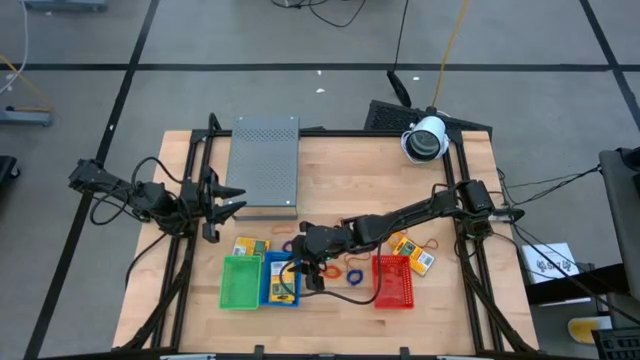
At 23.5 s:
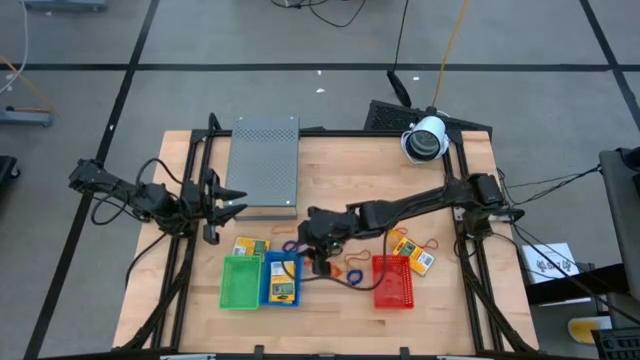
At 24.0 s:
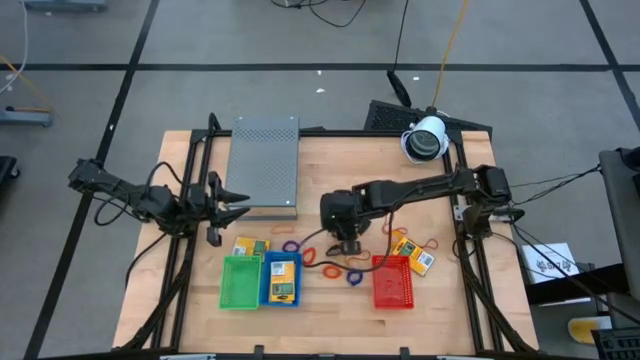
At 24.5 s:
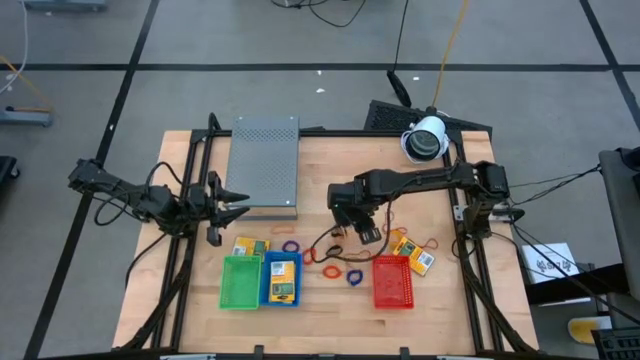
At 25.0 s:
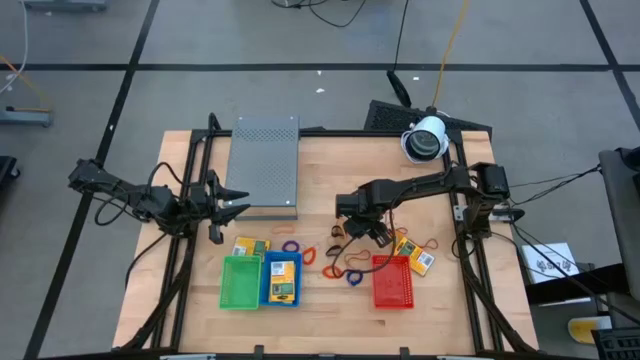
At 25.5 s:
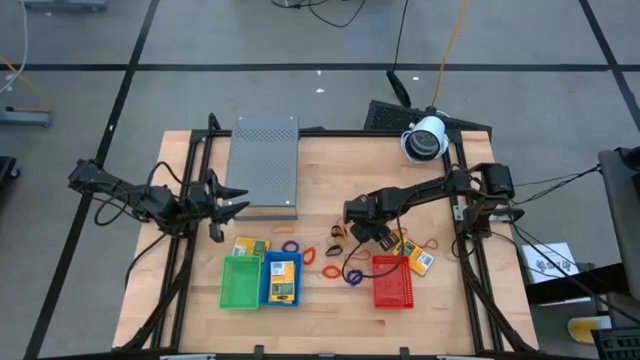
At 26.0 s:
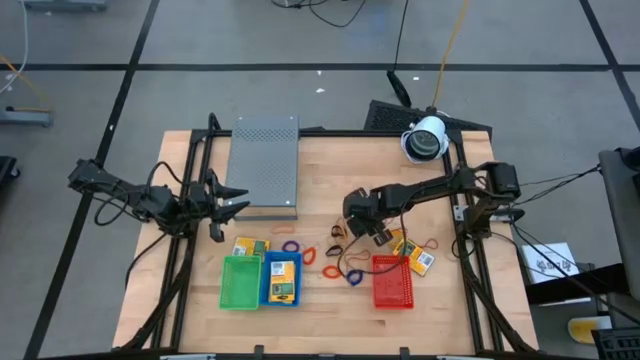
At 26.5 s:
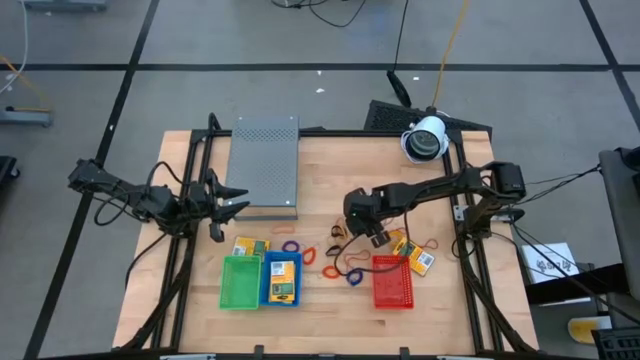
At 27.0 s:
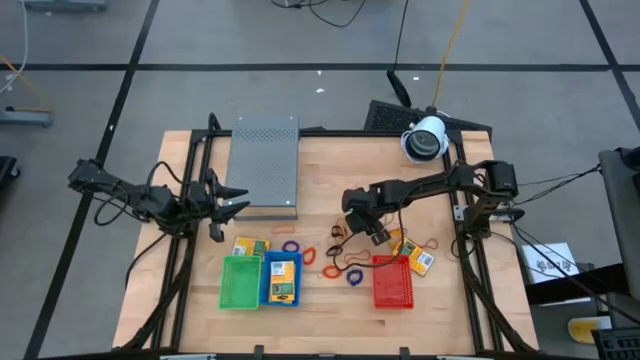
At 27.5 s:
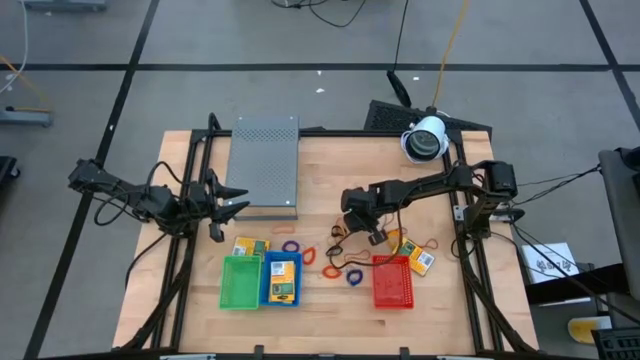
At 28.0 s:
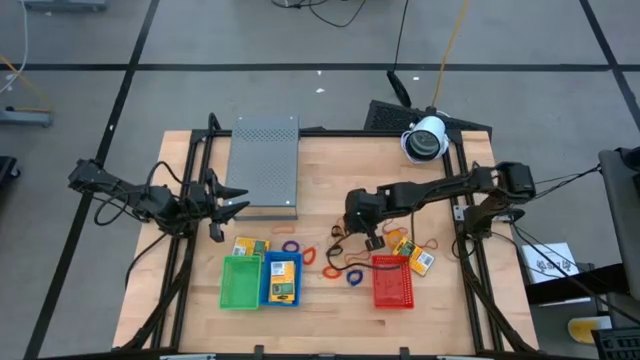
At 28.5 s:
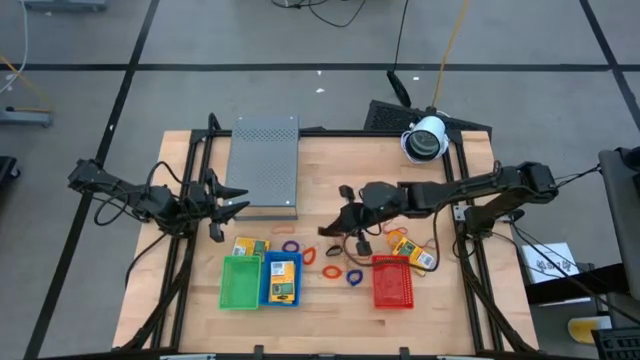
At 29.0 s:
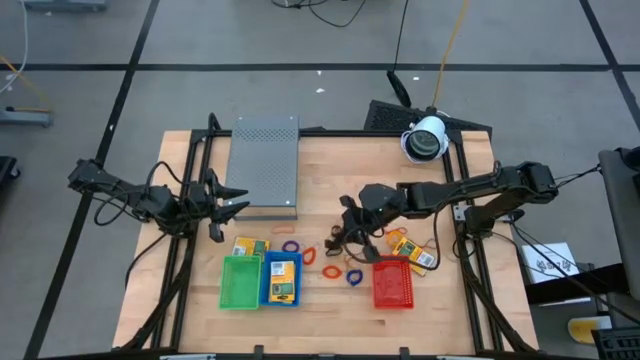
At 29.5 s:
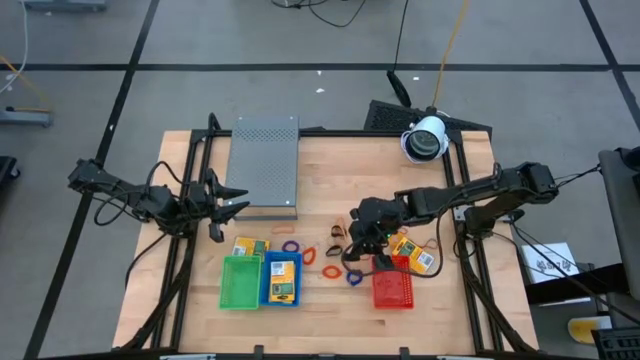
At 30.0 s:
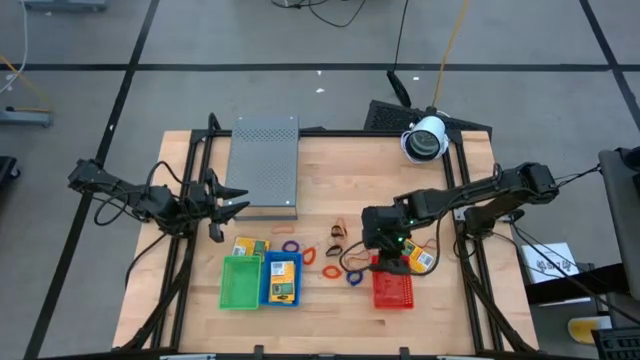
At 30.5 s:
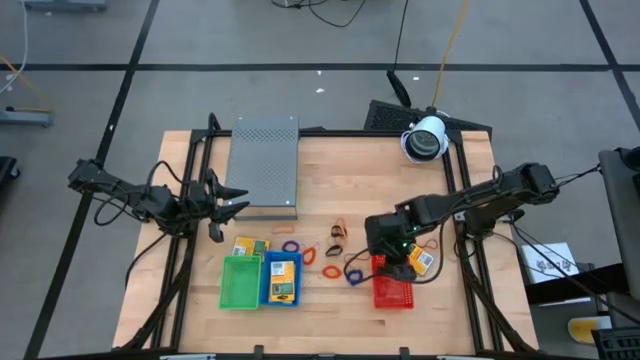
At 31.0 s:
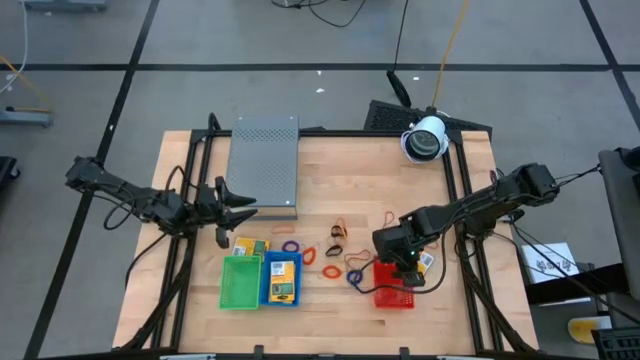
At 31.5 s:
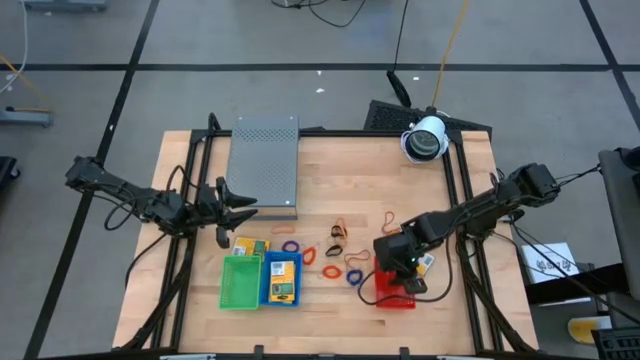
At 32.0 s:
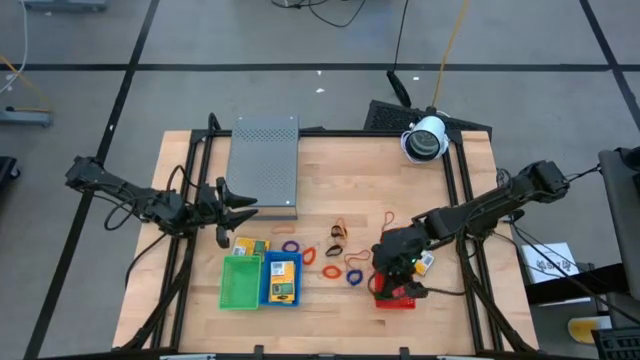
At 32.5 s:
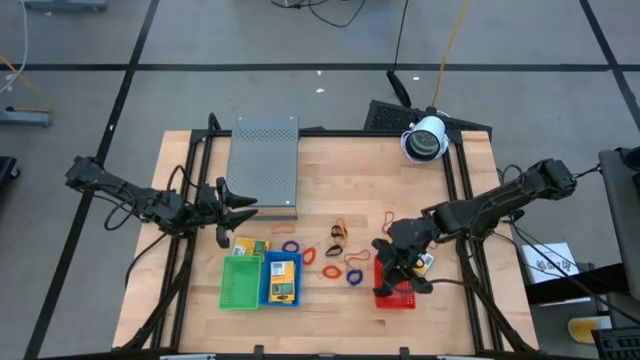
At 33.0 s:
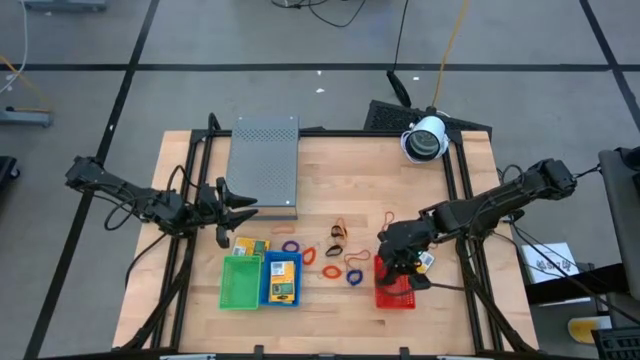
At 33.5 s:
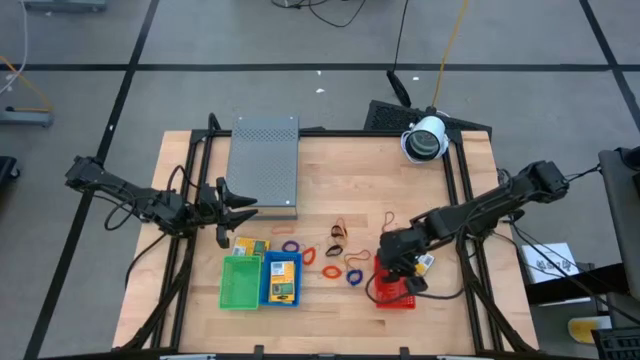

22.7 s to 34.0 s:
Task: Pick & Place Office Desk Supplies
Put the black rubber band into the red bin

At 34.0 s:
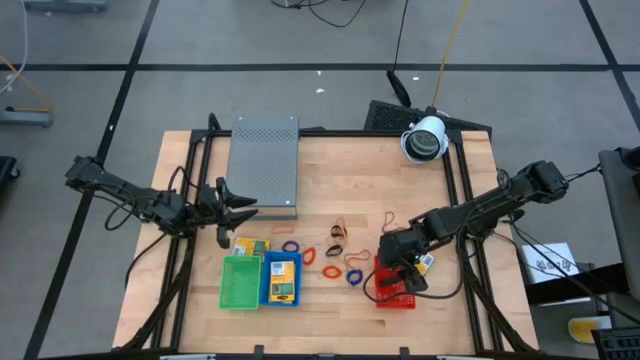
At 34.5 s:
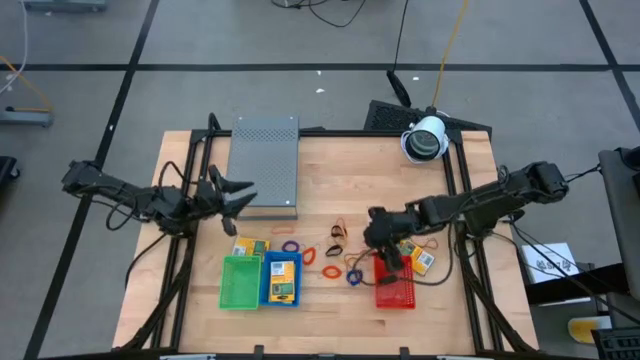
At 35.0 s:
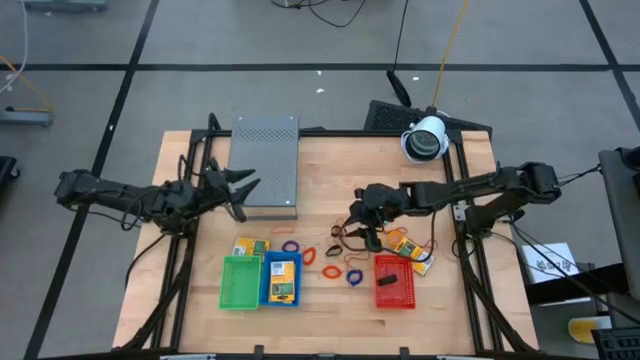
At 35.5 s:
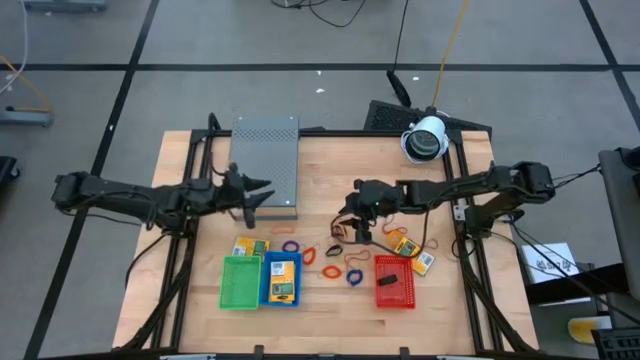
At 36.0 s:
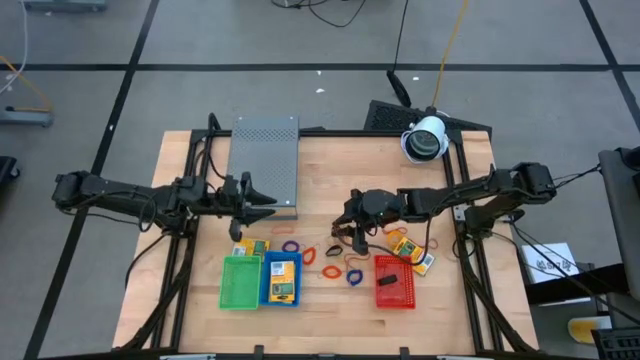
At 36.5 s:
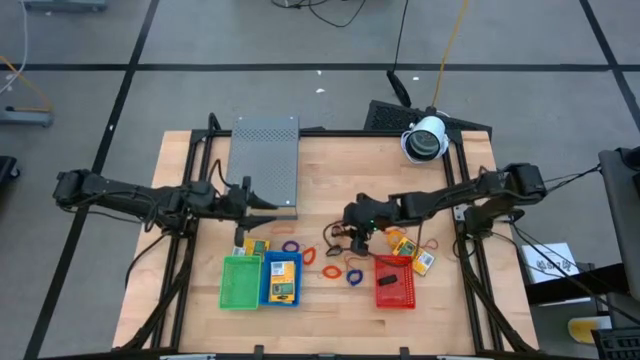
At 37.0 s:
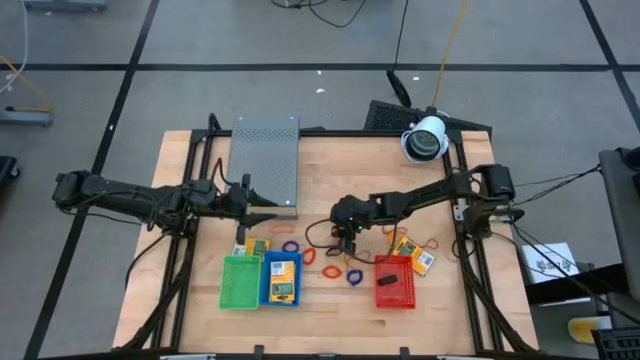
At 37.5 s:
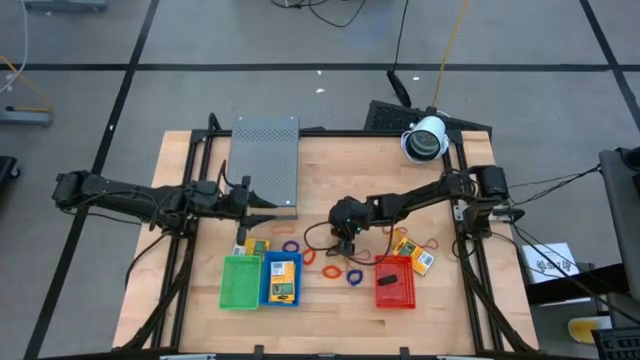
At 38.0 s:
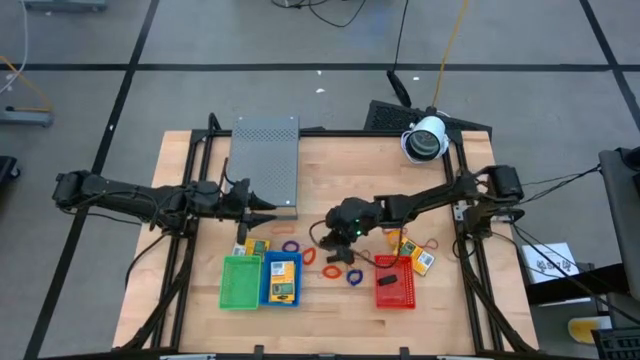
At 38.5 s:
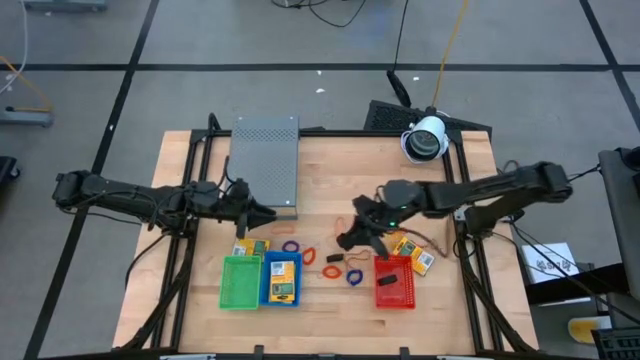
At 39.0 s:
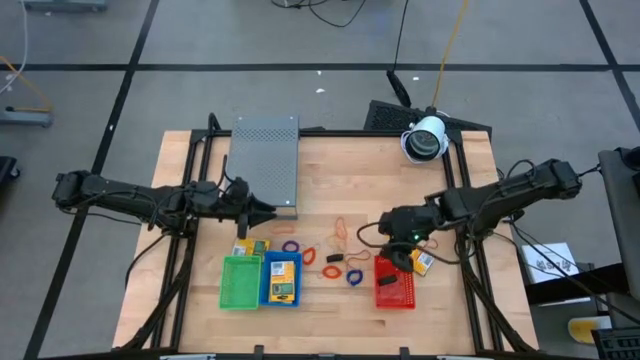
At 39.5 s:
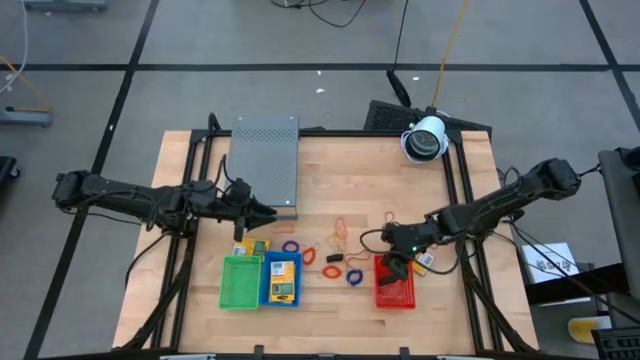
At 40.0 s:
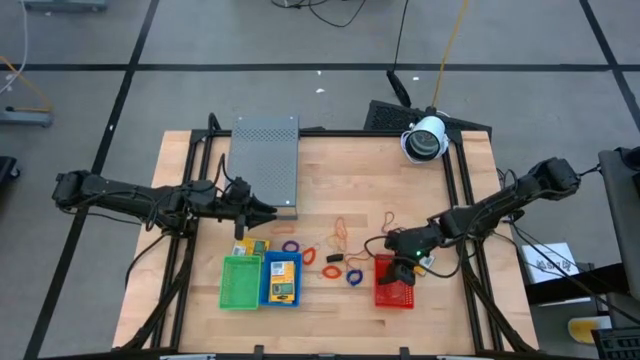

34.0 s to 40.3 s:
Put the black rubber band into the red bin

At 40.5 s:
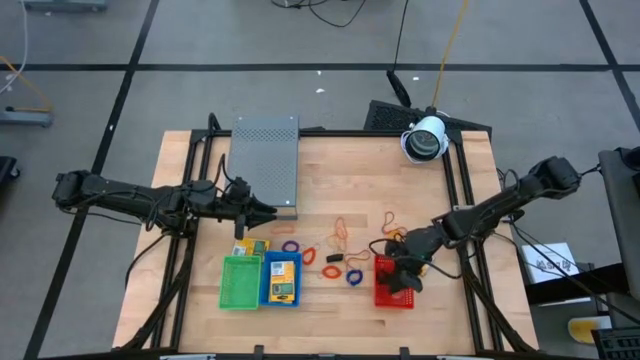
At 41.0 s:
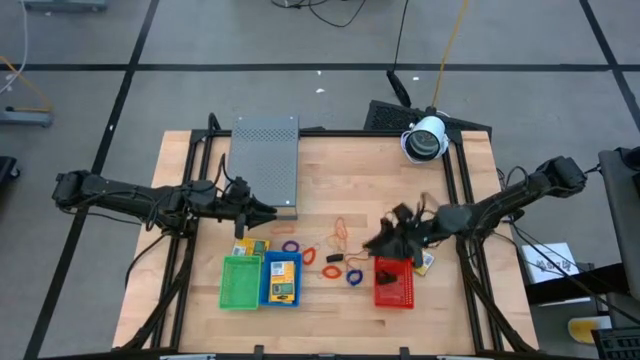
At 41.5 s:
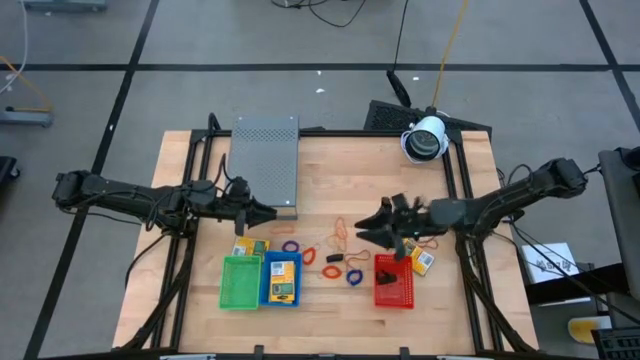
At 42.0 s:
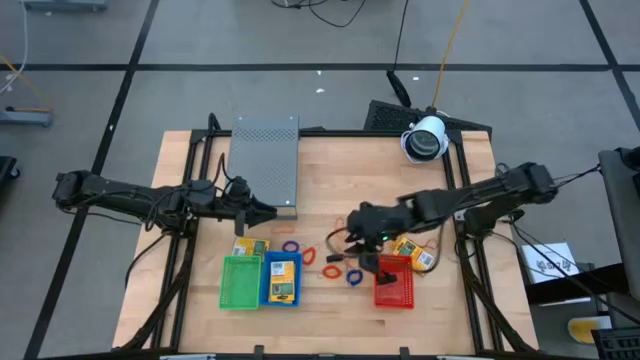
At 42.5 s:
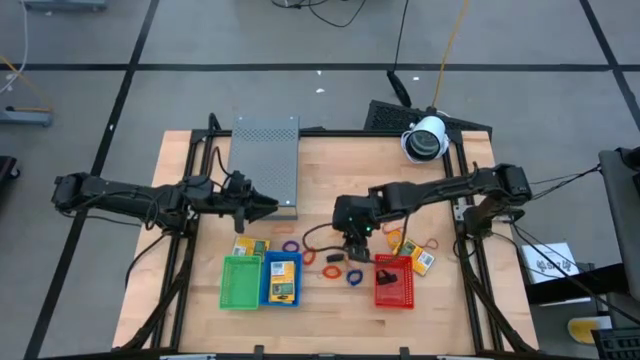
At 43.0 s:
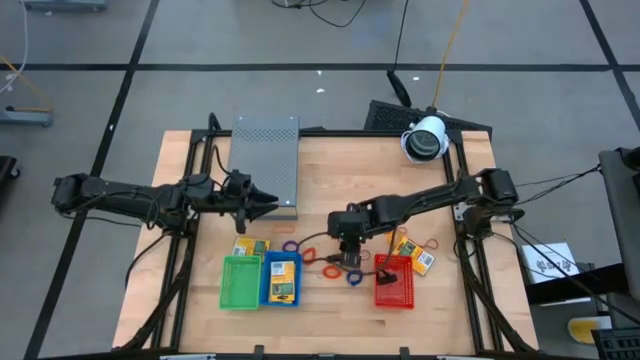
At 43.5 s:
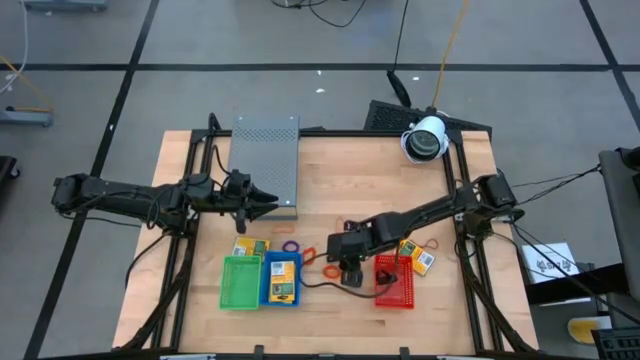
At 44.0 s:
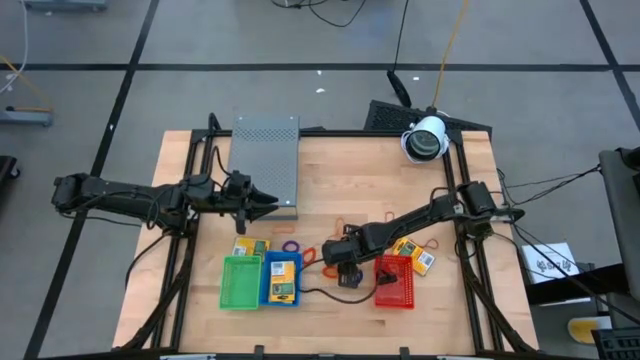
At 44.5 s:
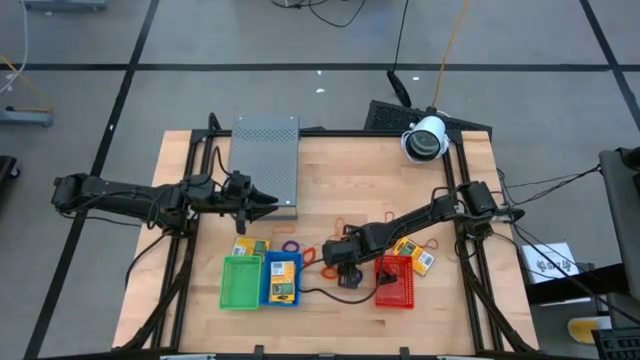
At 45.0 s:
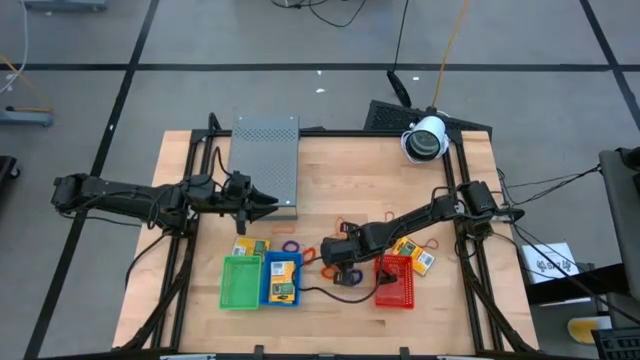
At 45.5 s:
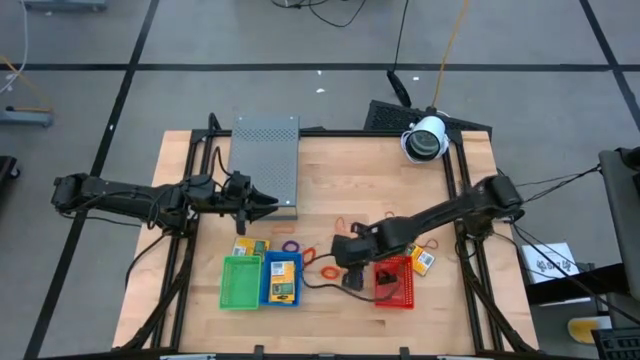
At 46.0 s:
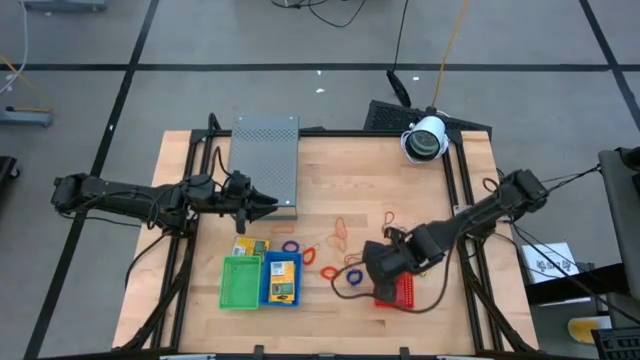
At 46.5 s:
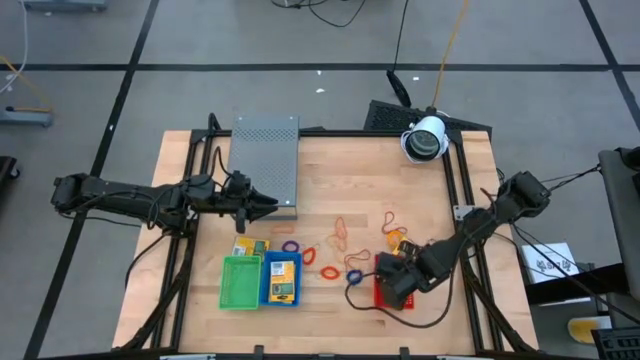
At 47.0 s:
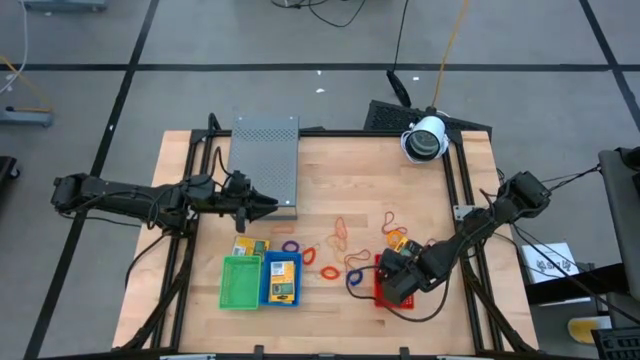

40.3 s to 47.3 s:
Put the black rubber band into the red bin
